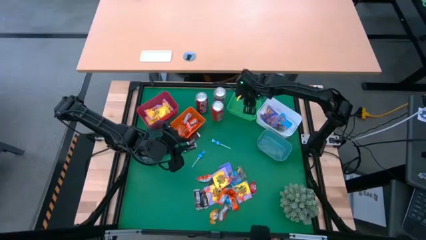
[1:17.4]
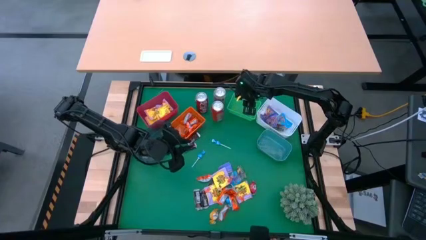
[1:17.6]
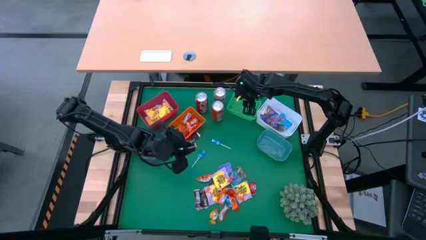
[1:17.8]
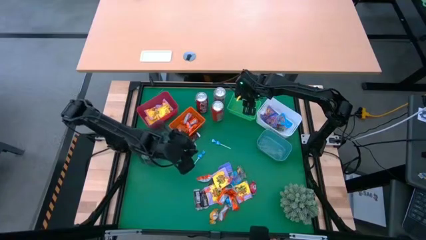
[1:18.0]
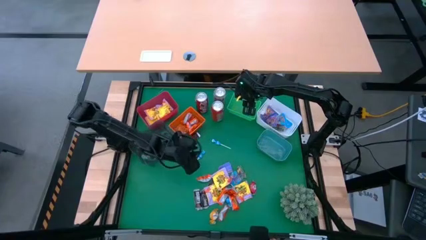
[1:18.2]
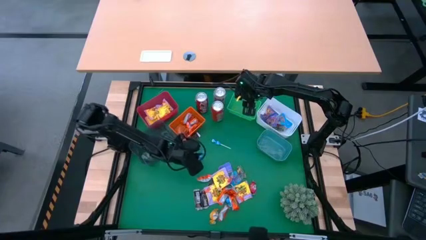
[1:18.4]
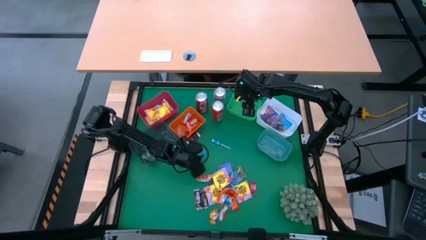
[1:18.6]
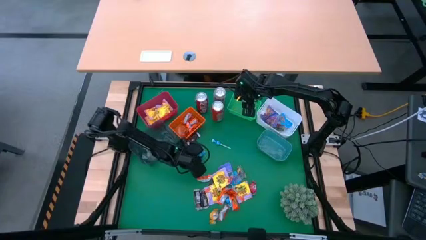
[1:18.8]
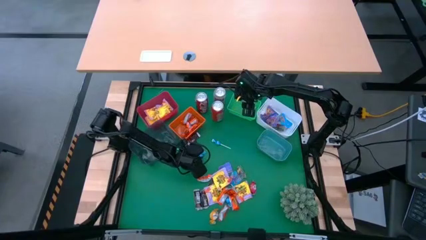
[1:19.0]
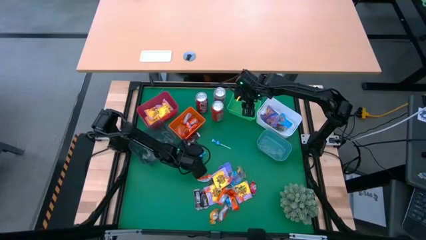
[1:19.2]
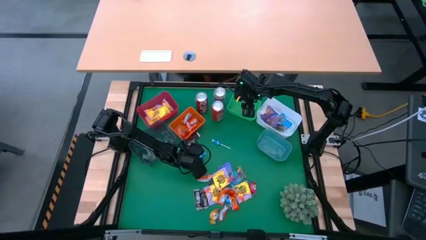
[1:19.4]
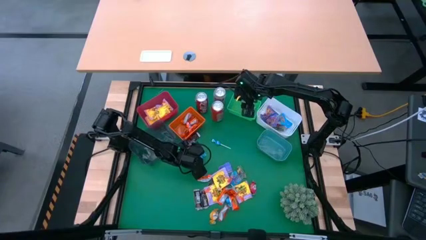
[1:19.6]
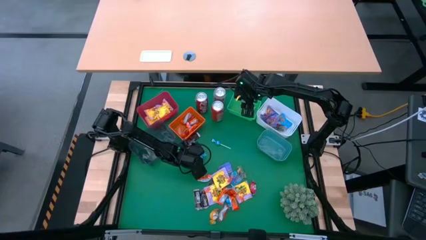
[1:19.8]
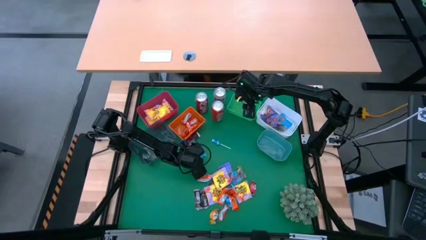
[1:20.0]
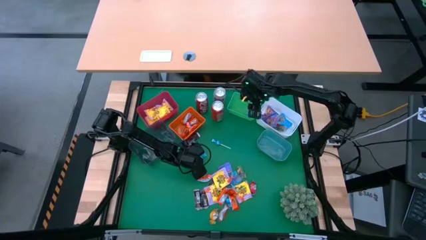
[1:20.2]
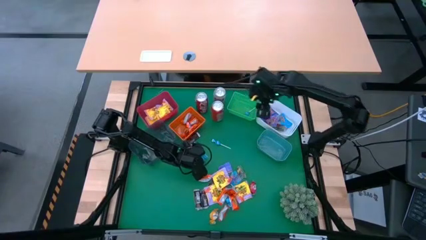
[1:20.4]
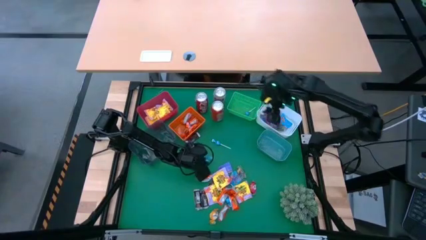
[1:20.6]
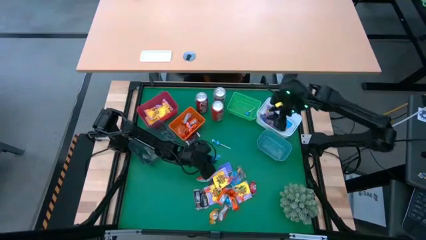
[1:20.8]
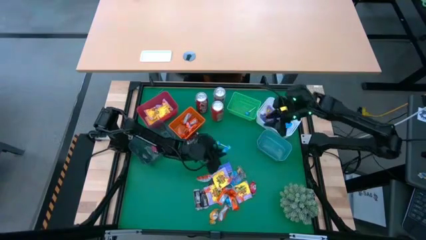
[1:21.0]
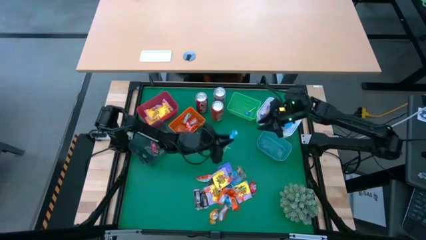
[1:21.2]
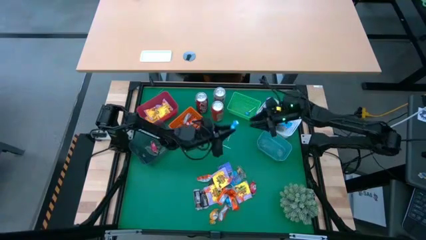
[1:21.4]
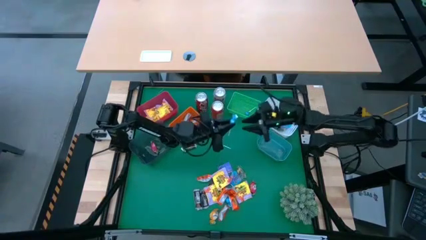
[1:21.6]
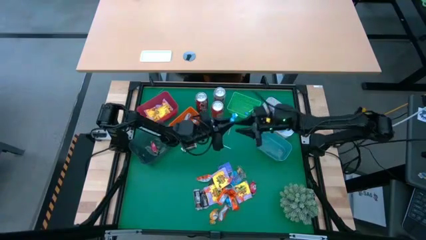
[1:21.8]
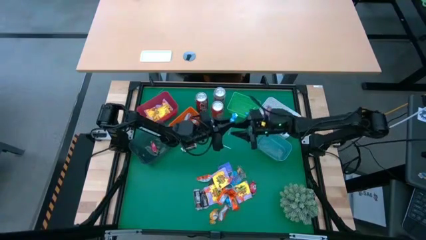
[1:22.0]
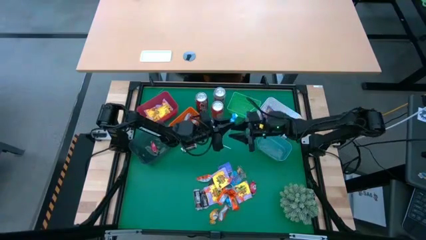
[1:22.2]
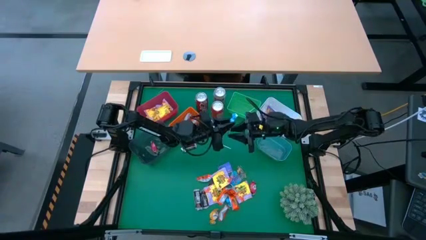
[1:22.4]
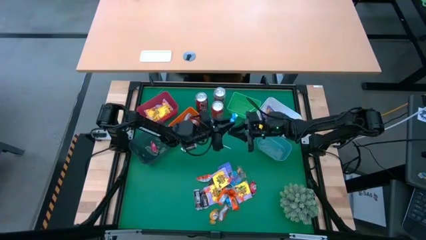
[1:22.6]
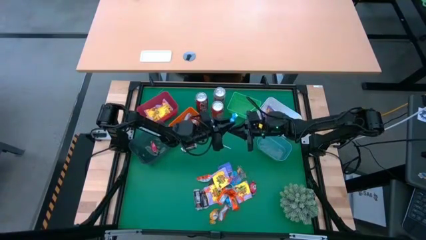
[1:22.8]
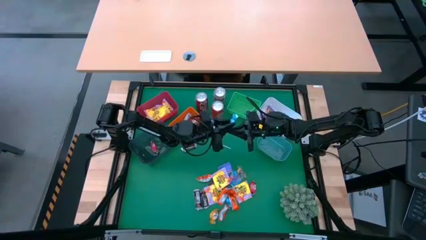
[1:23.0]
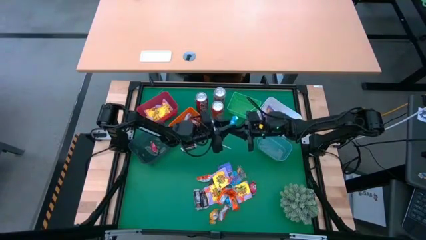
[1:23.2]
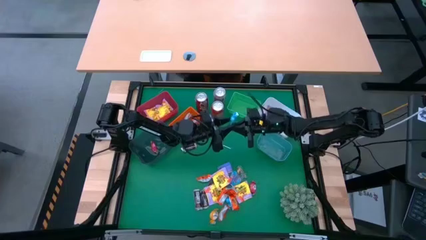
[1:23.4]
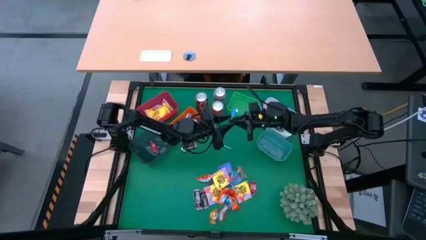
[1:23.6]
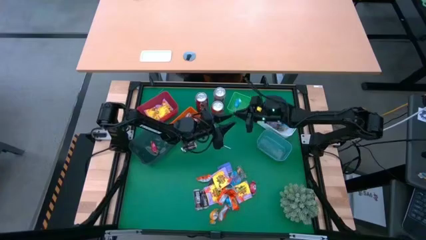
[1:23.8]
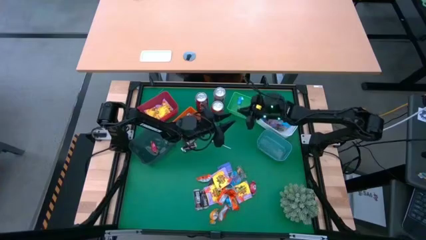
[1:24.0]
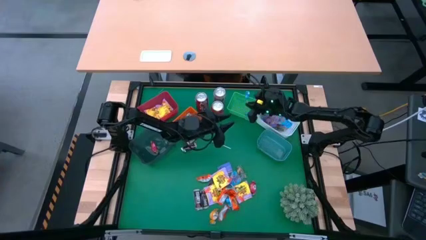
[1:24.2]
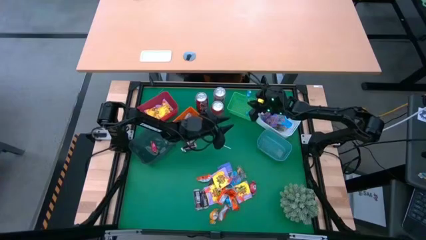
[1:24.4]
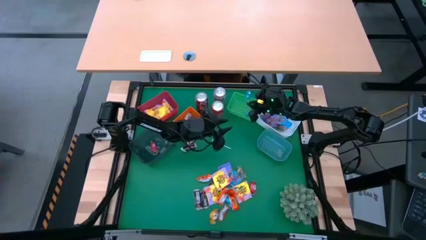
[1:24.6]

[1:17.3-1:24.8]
Task: Sort candy
Put the blue candy into the green bin

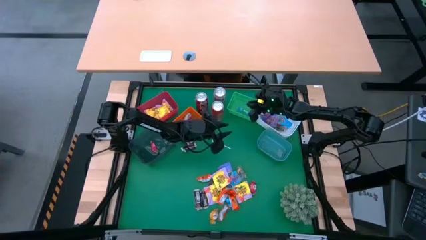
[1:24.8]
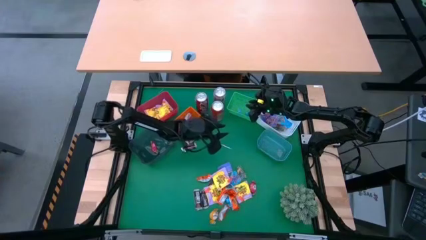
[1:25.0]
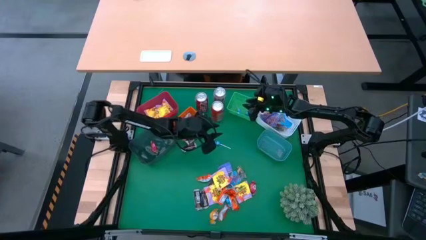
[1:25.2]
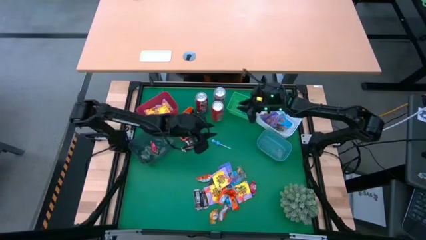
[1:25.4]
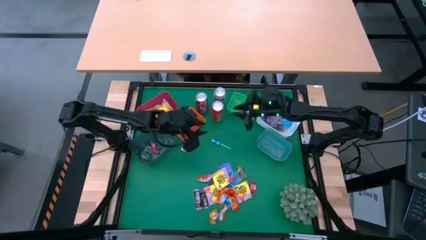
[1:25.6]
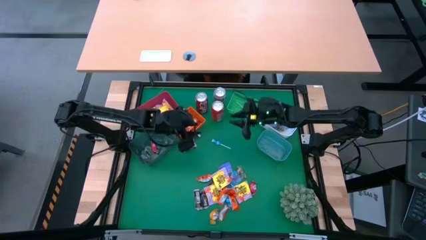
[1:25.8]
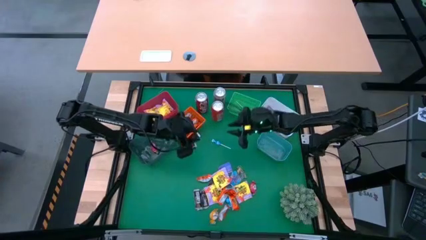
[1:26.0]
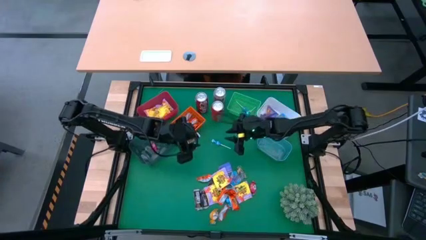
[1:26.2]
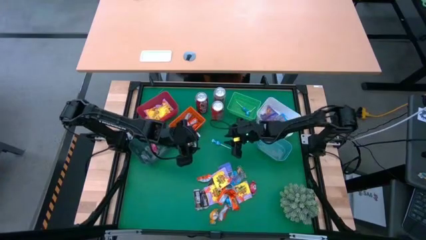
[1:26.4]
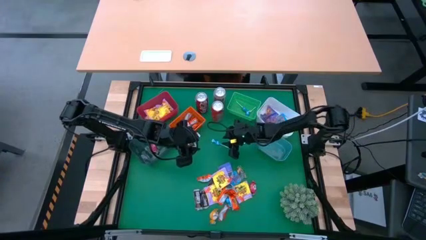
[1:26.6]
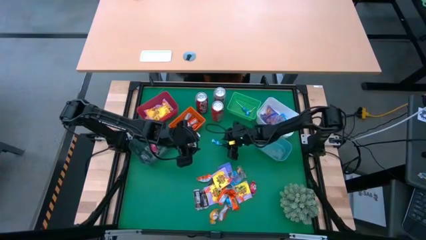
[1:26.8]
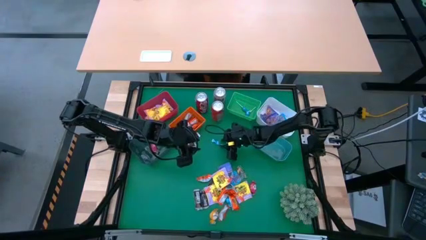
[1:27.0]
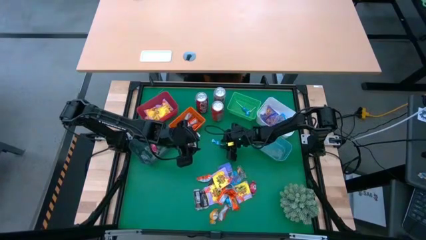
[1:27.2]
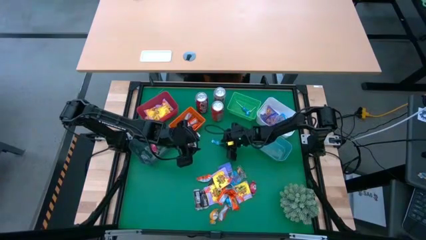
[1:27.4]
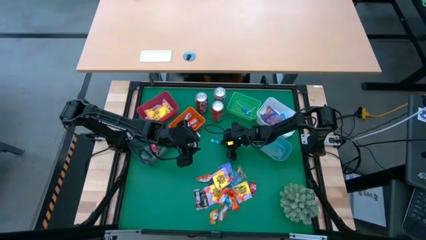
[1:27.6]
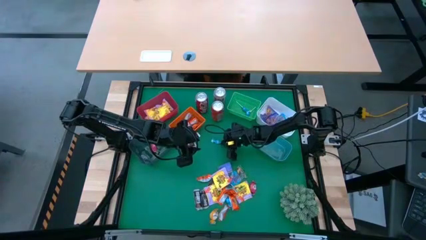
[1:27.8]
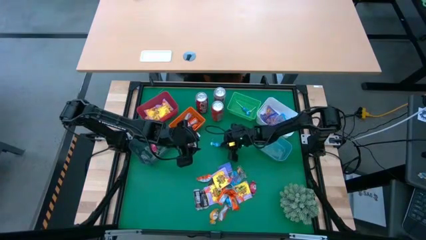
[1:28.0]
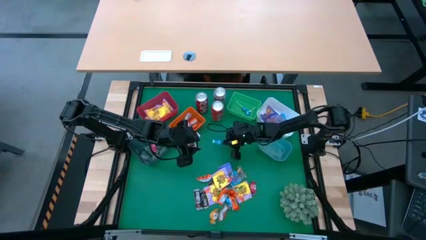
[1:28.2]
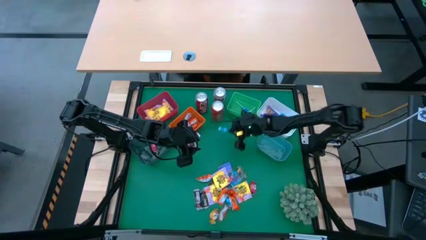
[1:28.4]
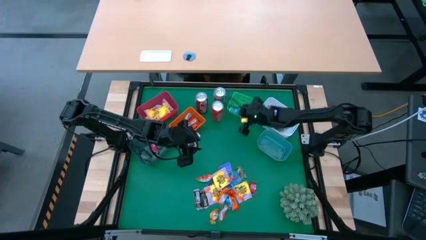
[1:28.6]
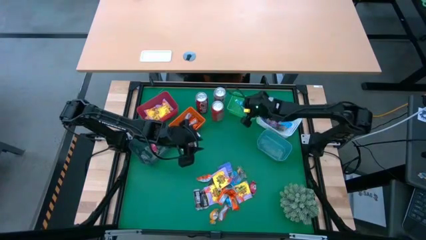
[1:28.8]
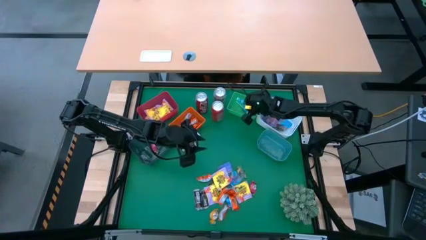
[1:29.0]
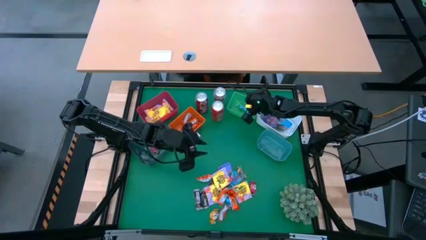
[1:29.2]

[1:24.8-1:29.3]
Put the blue candy into the green bin

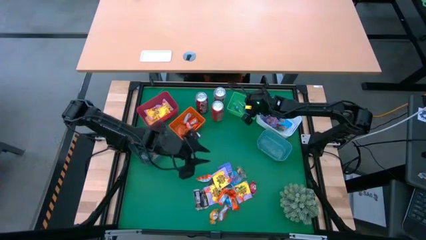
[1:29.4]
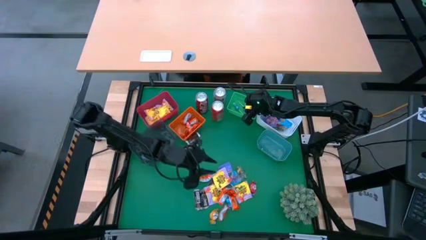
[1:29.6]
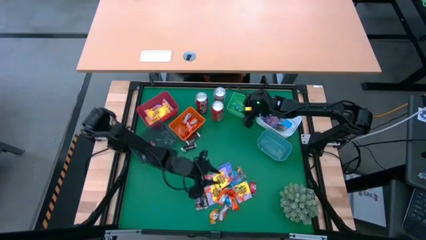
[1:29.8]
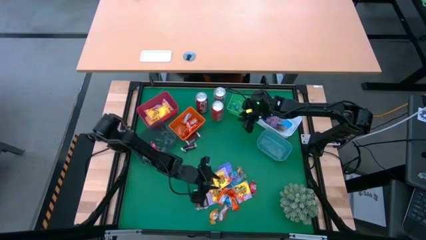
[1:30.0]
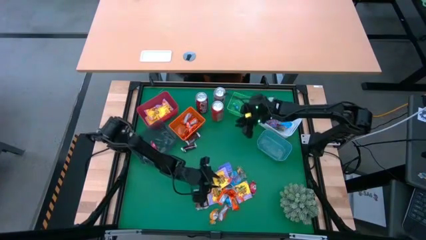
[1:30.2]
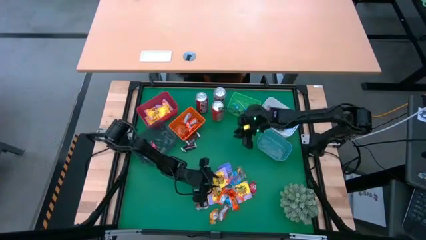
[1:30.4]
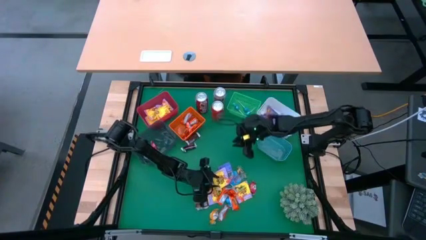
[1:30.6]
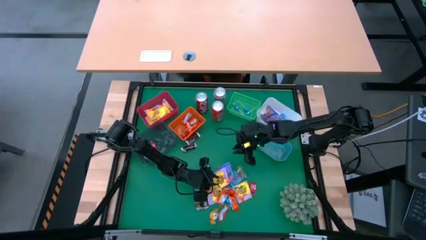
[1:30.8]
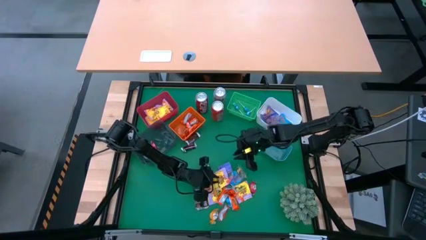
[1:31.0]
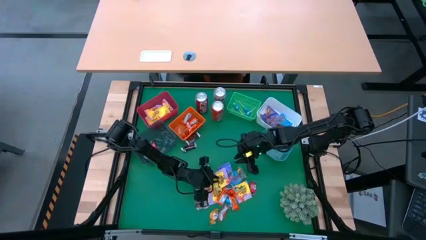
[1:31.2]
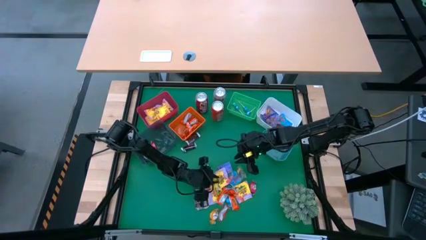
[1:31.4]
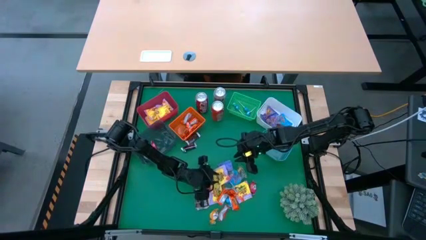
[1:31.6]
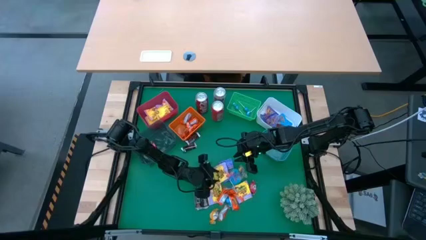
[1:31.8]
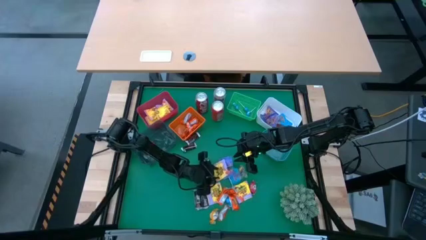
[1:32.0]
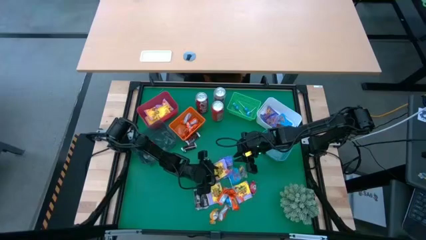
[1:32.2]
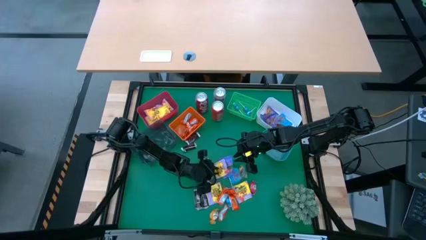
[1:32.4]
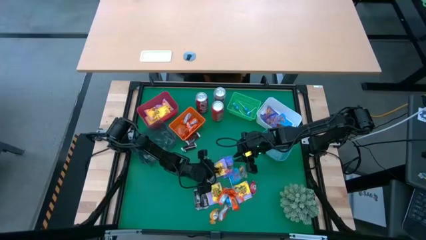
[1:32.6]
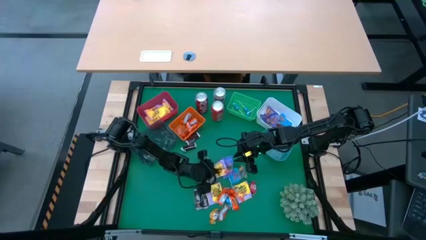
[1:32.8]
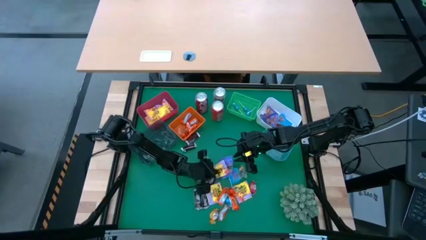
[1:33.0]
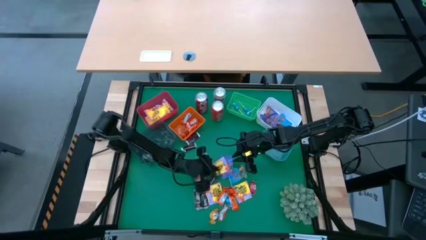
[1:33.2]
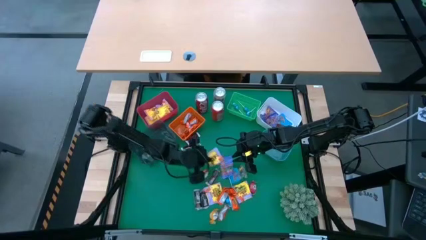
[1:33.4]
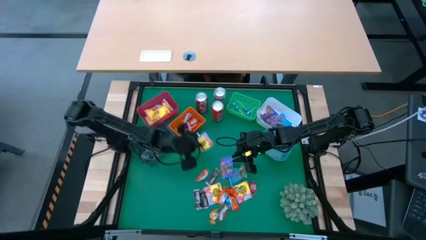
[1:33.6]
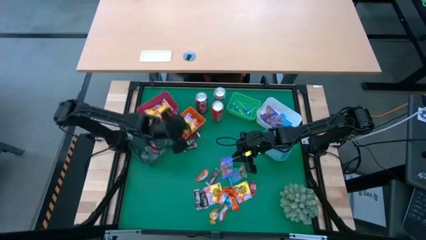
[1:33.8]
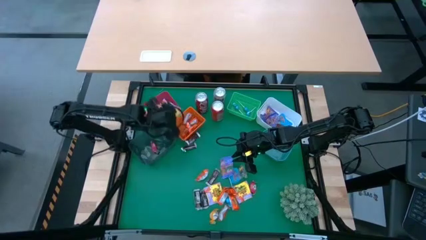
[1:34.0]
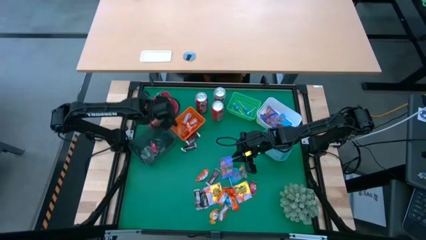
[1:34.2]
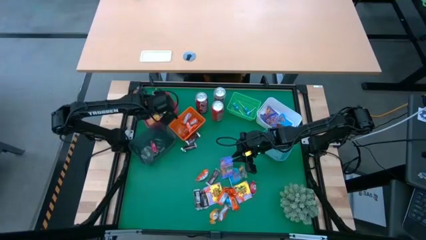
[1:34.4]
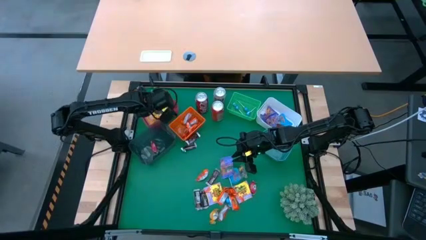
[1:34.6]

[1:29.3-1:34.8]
Put the yellow candy into the red bin
